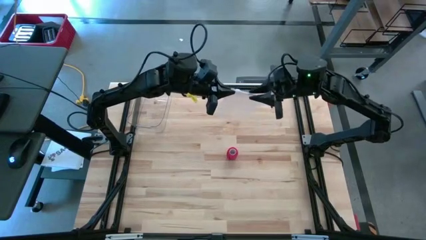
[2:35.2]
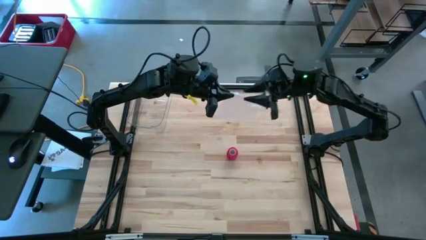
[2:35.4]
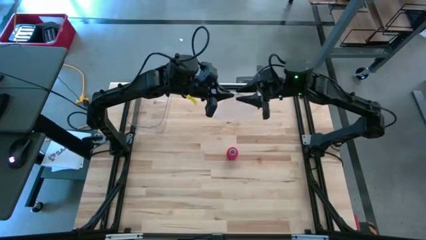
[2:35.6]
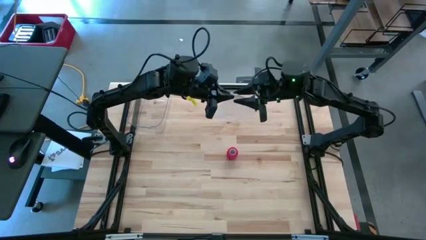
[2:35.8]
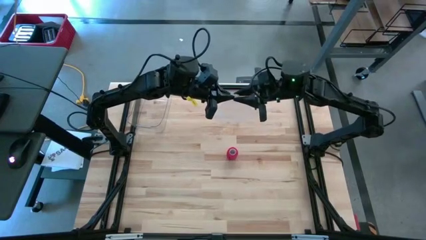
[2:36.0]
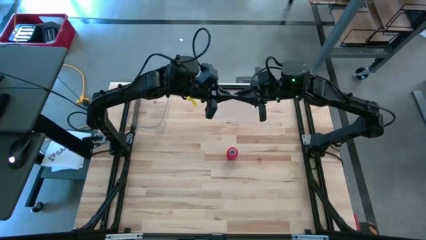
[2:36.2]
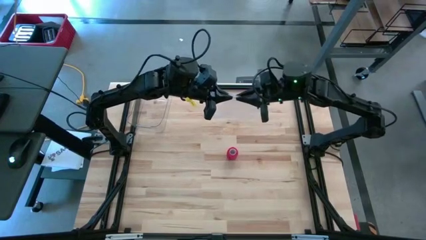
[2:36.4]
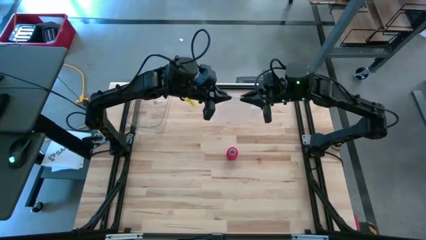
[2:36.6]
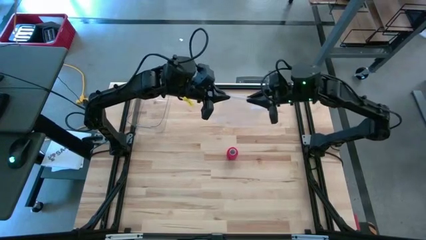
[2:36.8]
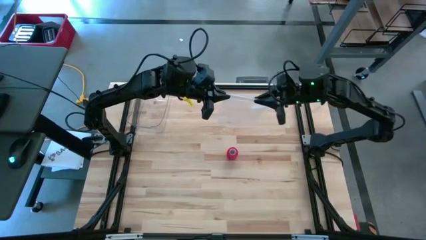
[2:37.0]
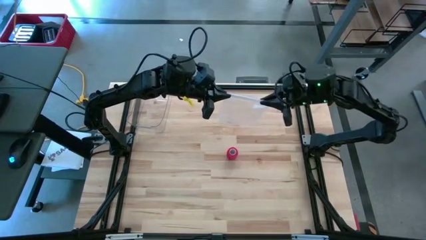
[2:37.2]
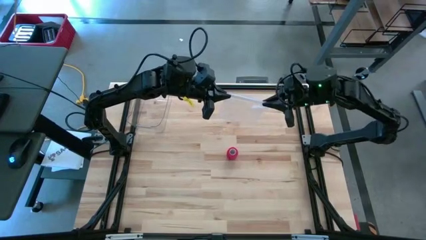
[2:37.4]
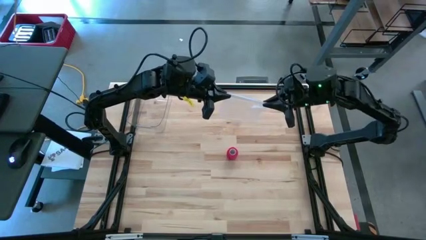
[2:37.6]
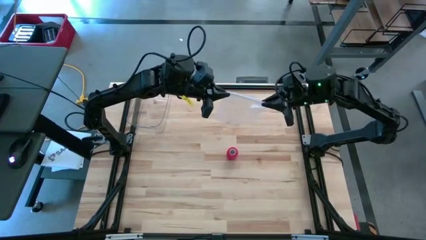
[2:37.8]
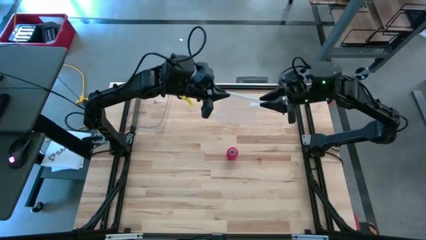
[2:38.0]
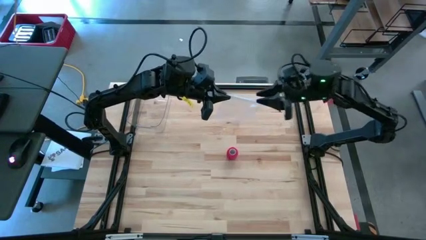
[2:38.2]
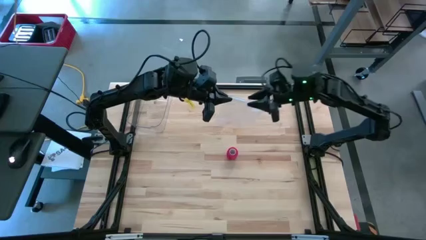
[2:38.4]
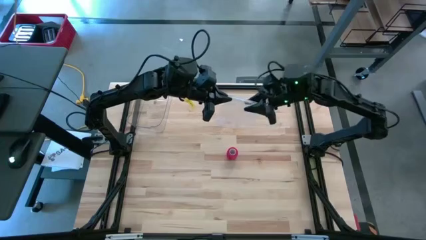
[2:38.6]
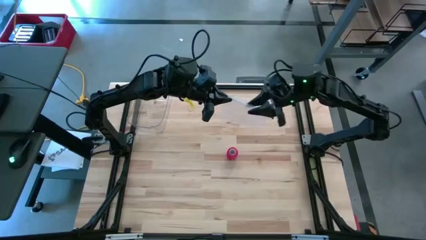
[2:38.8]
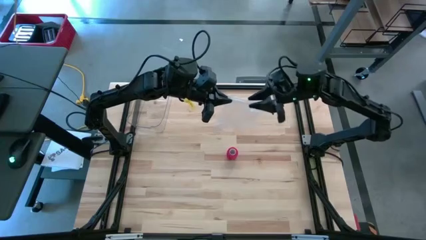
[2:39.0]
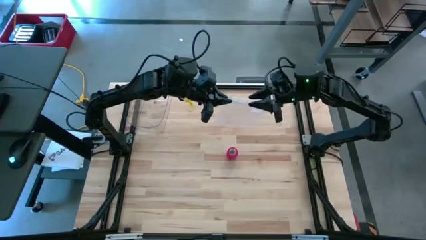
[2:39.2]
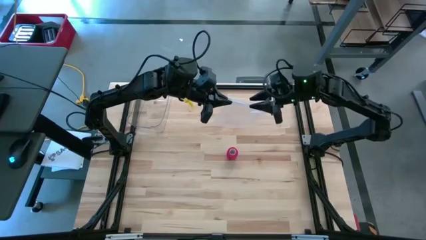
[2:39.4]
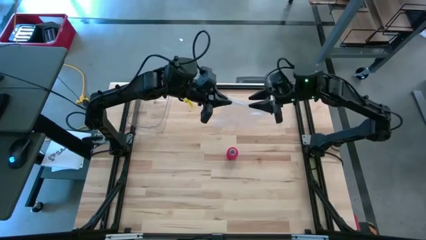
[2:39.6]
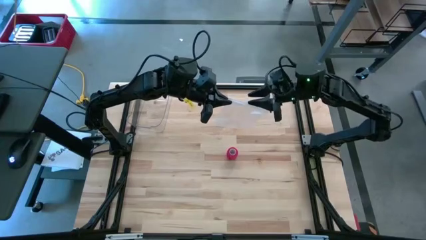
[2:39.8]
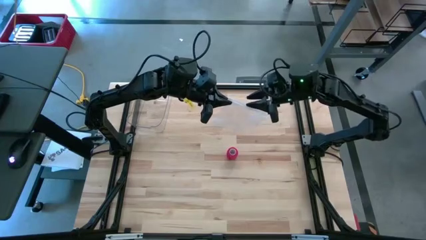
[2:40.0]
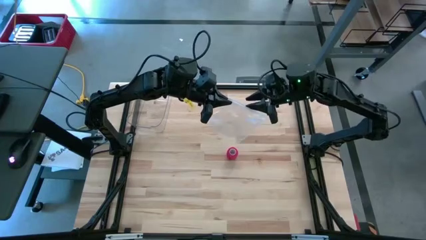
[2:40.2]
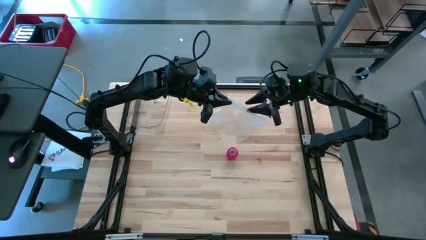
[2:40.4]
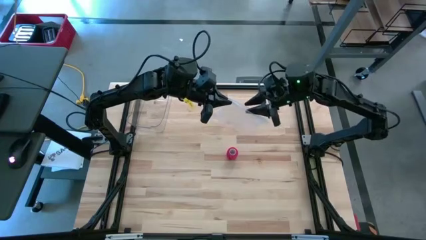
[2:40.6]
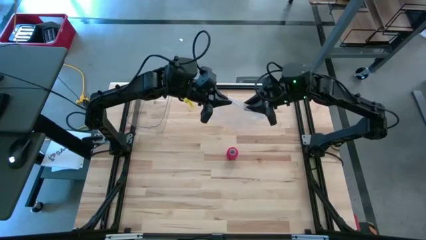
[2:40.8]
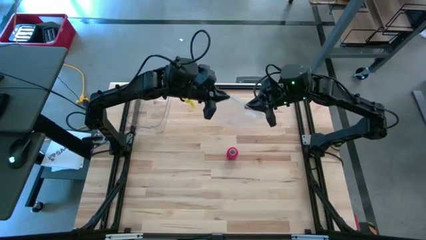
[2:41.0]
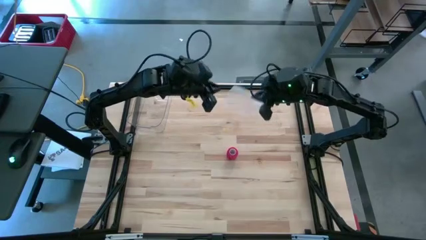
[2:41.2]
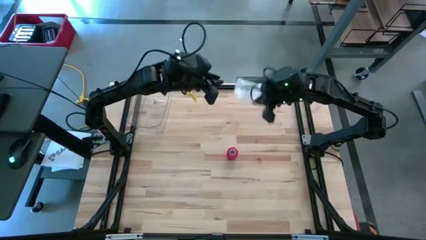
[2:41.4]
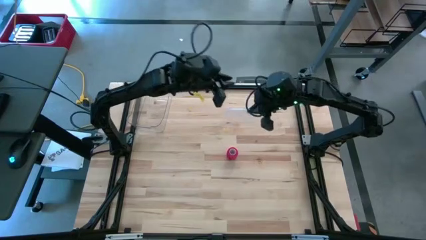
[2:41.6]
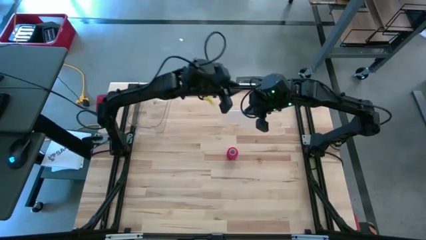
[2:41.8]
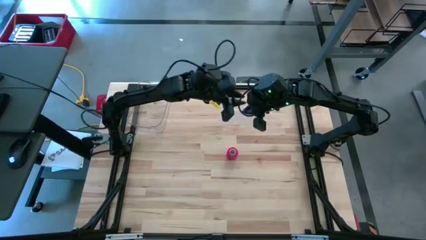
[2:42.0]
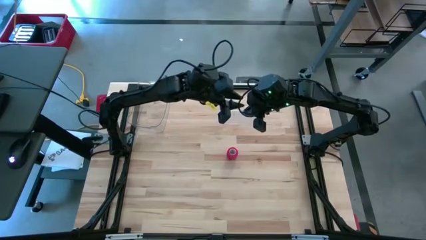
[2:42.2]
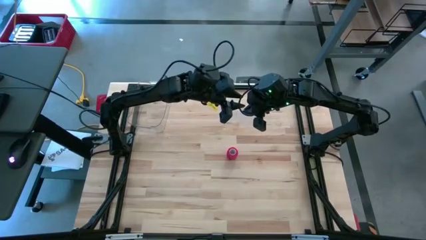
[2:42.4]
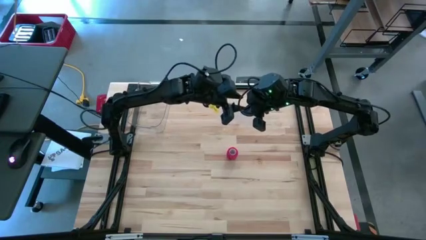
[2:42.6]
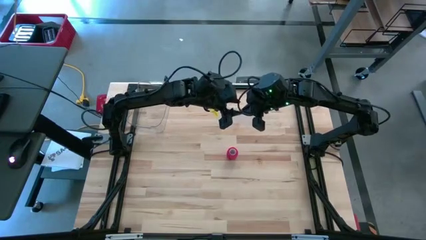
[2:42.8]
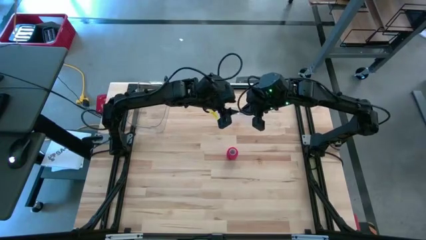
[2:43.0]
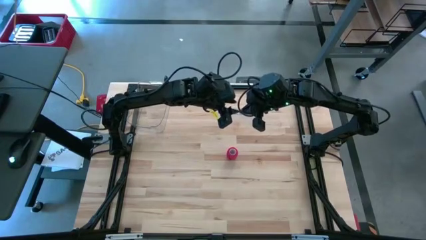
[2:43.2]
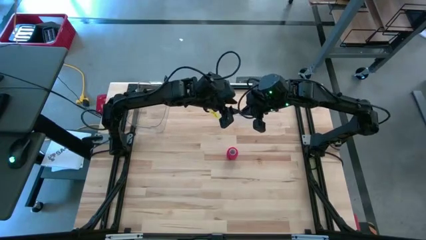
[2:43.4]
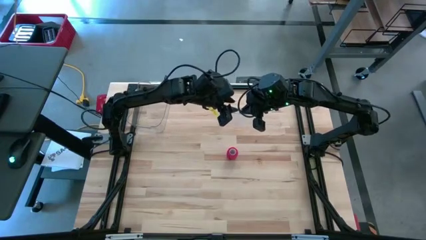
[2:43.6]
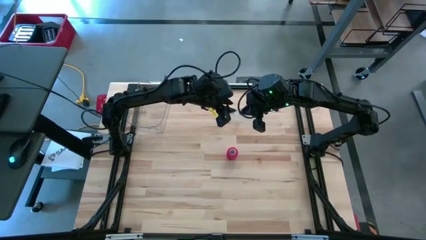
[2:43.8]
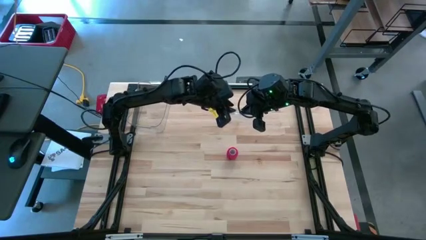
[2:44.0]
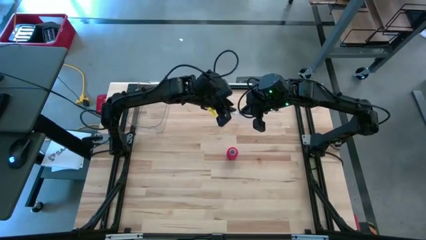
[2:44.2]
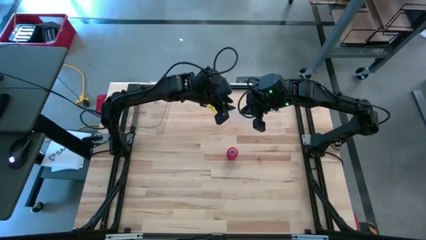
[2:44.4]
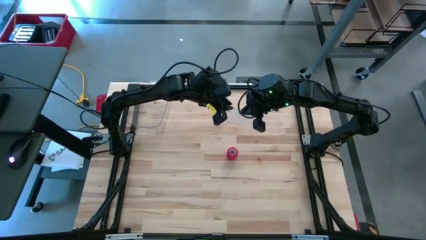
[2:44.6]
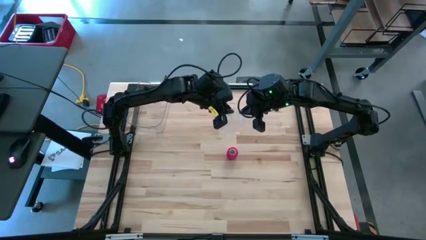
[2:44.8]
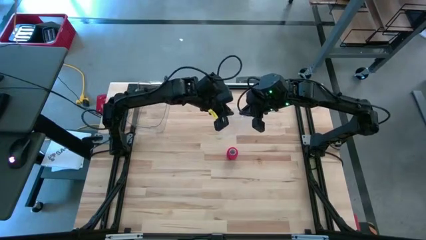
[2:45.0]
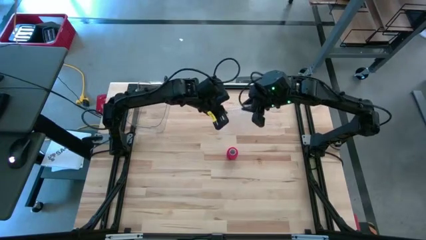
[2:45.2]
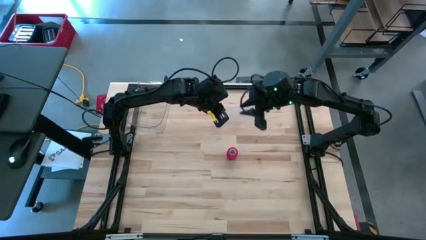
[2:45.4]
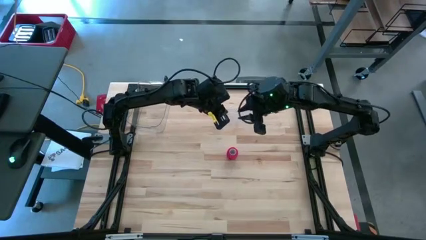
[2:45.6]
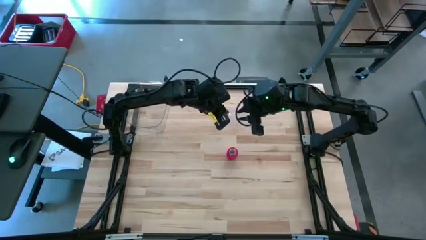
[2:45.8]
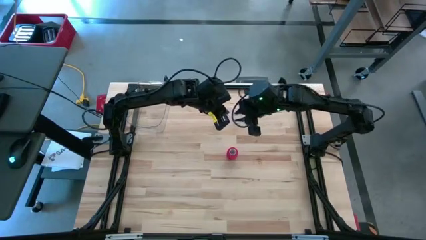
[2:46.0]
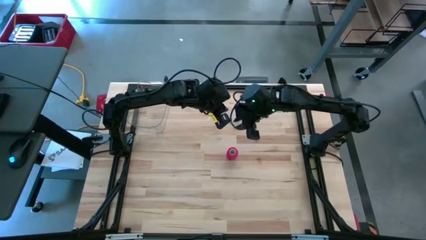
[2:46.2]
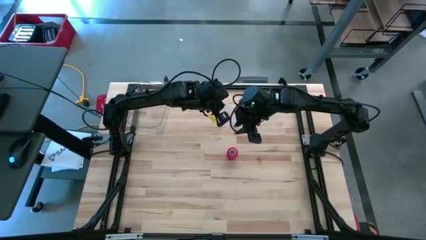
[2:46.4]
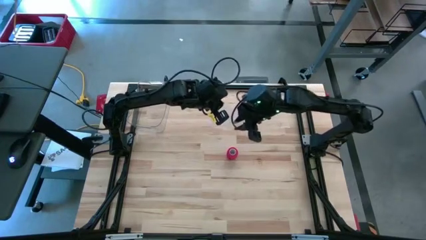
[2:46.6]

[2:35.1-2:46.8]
Task: Roll bandage
Open the transparent zip bag

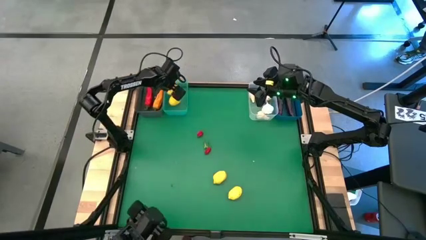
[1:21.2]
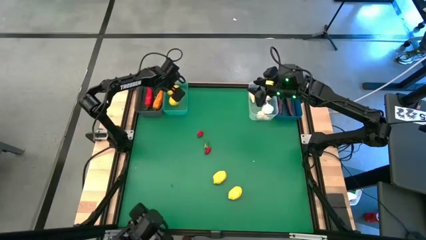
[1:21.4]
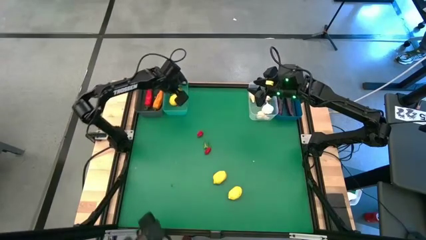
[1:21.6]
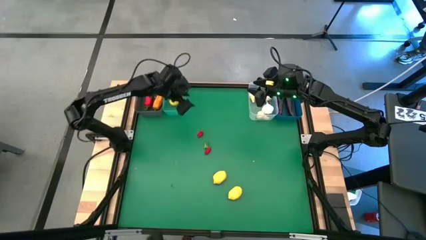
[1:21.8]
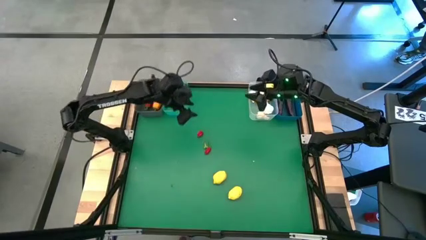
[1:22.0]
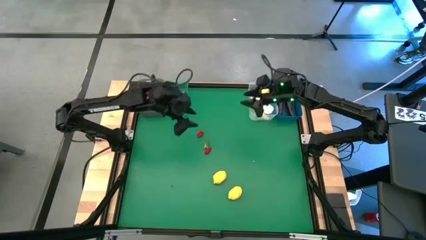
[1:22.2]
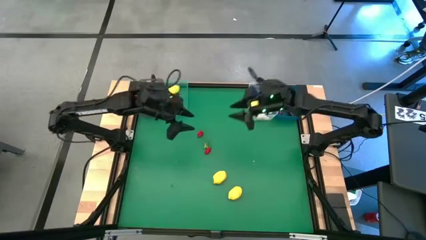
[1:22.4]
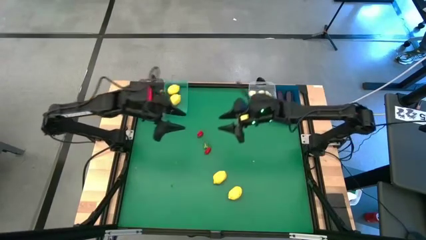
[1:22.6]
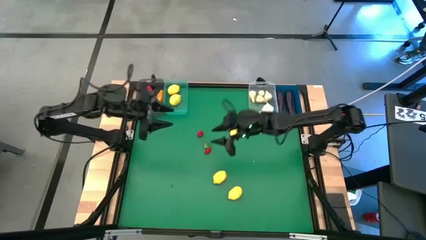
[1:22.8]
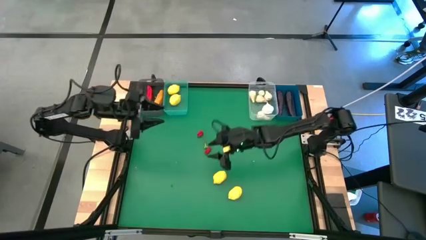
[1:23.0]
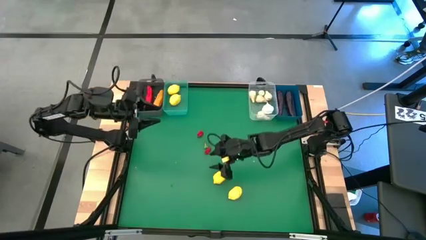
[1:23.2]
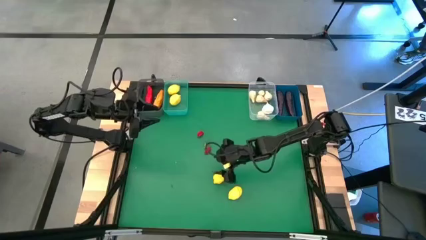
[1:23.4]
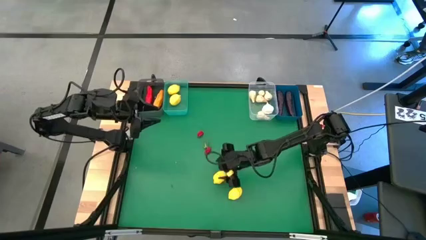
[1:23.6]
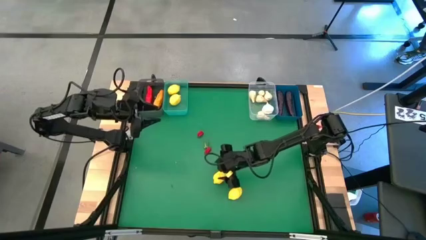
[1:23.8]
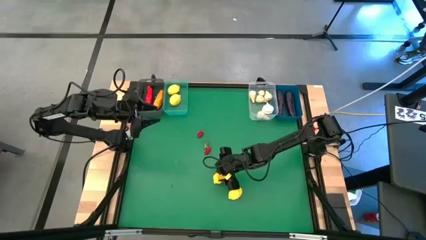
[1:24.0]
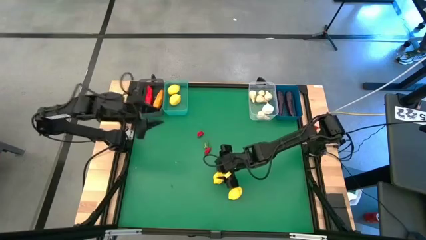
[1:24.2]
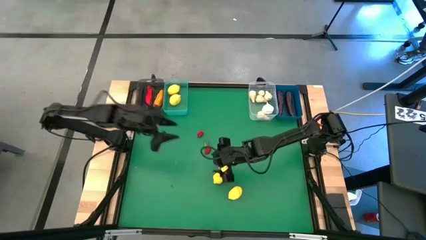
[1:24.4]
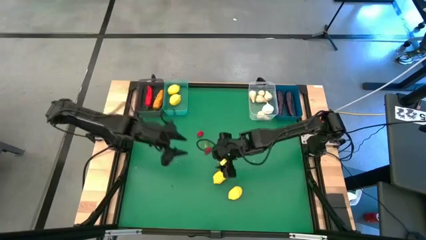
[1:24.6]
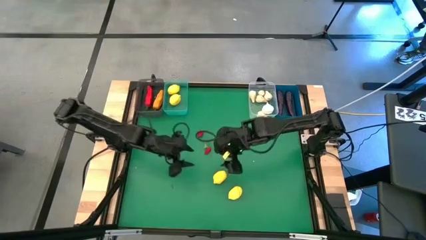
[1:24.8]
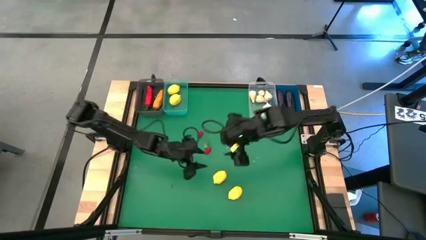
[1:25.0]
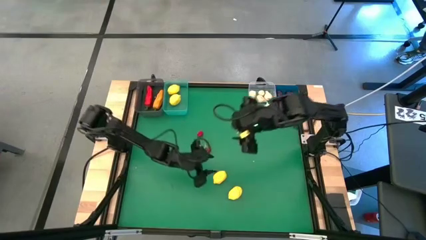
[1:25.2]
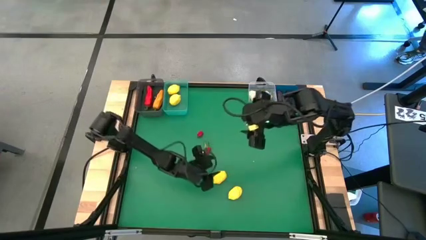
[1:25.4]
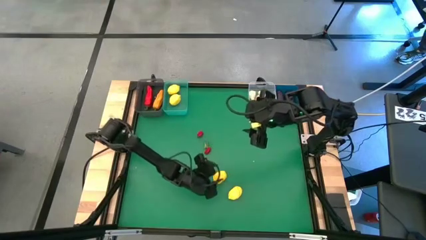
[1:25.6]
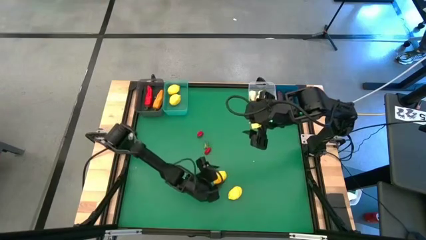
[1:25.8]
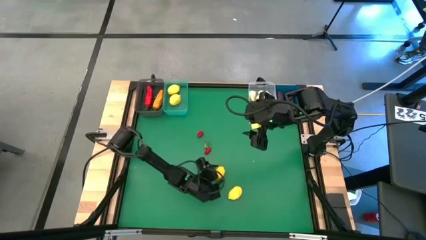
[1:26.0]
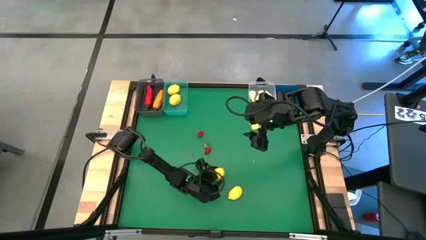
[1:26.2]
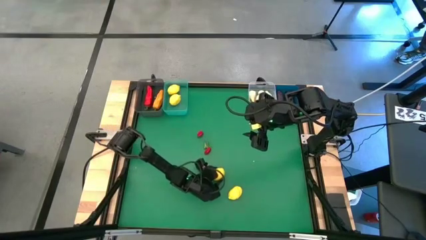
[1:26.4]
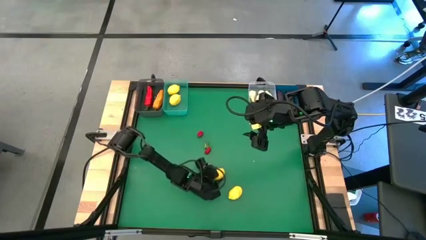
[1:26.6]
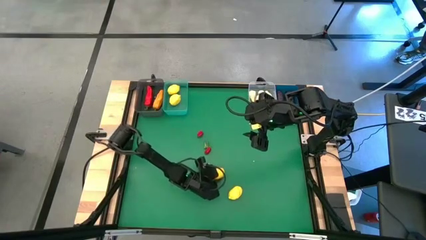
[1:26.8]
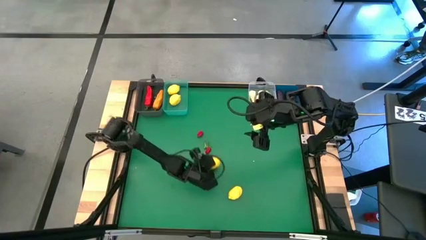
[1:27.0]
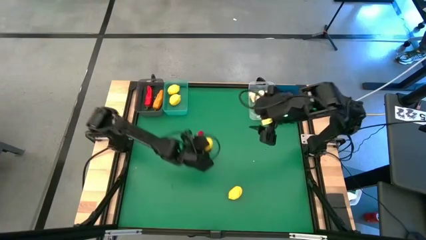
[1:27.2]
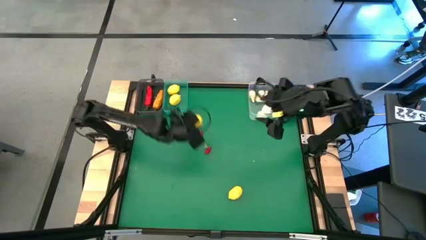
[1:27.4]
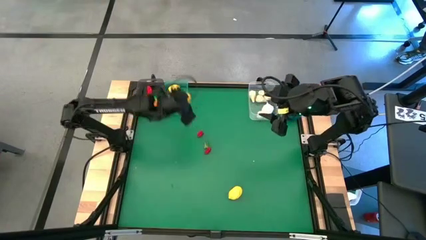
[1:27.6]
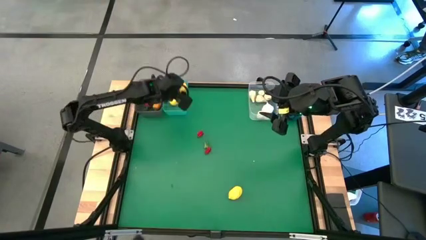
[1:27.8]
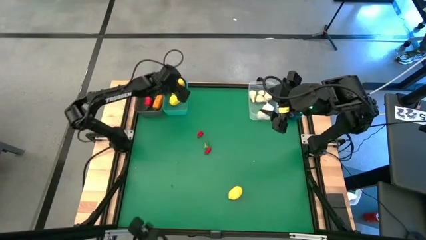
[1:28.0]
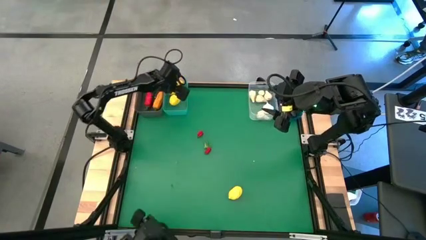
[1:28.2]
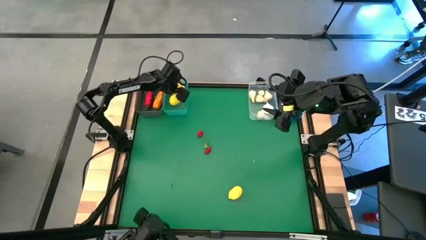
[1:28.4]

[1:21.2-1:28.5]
Task: Sort produce into baskets
Put the top lemon into the transparent light blue bin
